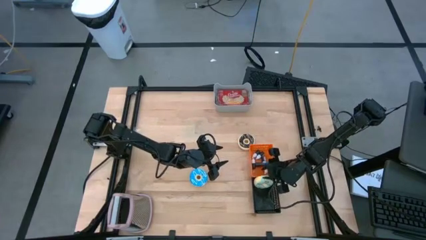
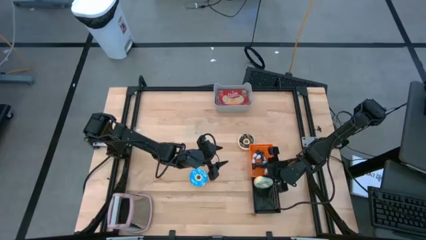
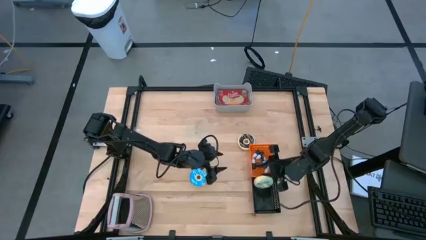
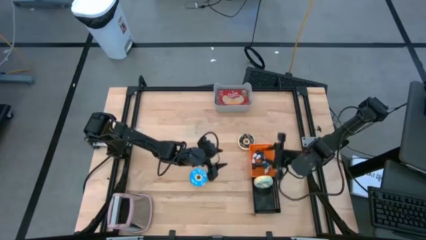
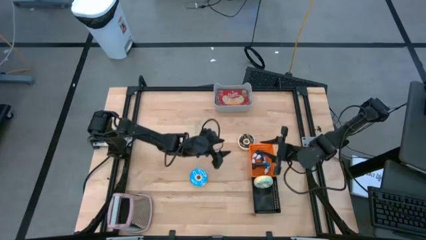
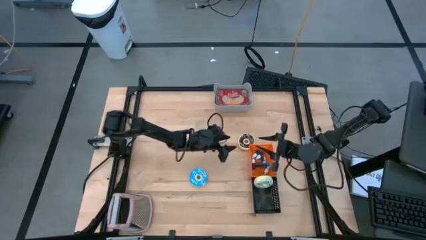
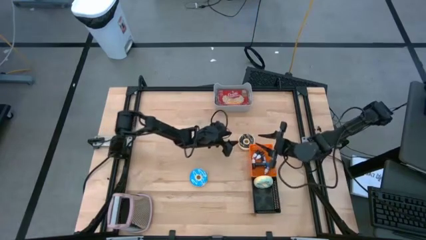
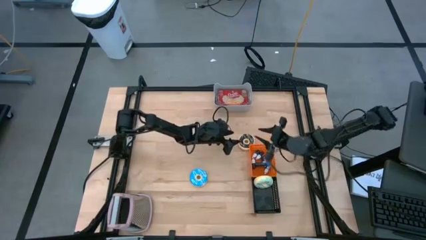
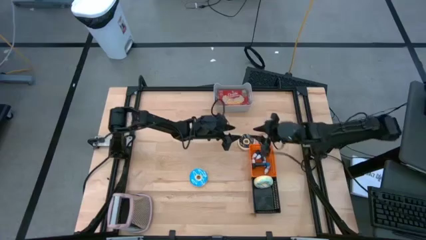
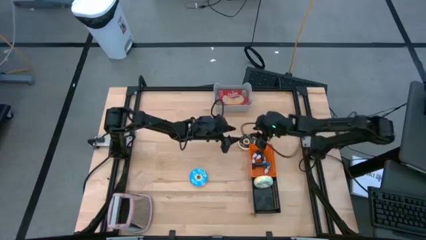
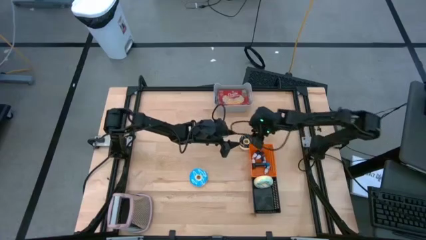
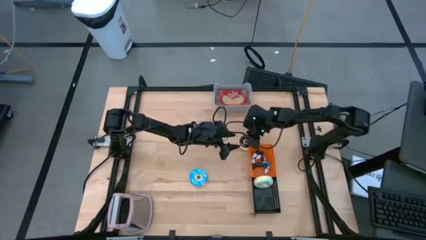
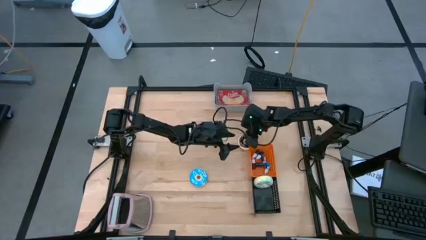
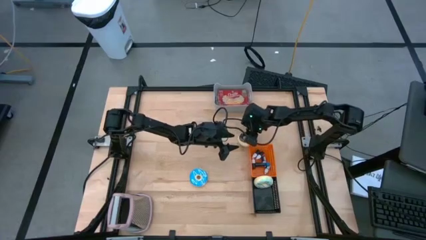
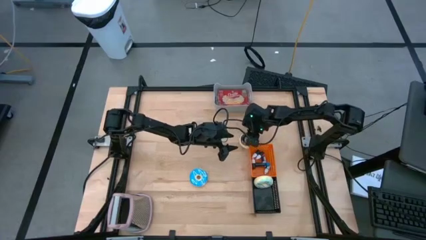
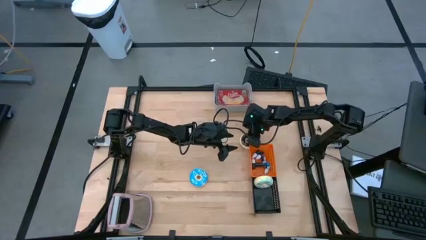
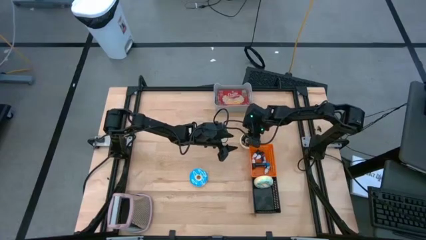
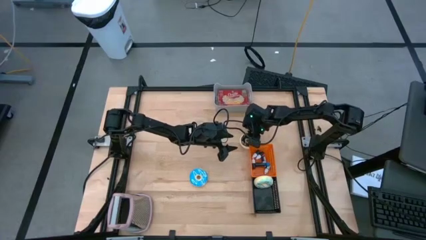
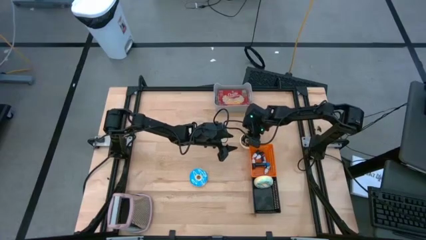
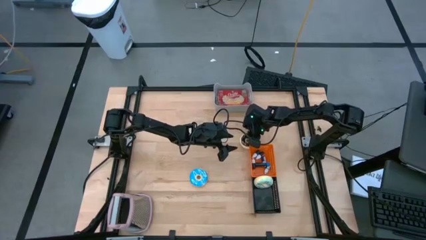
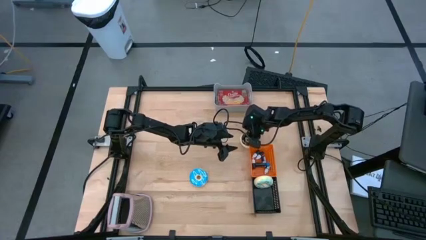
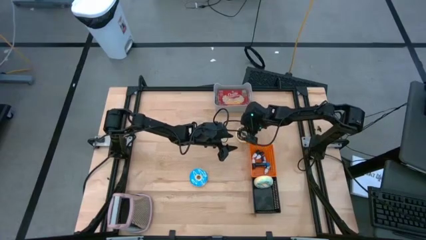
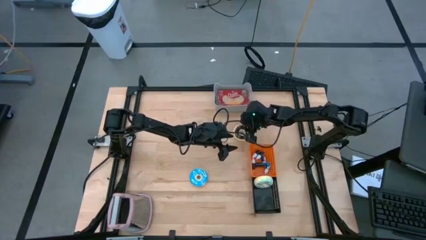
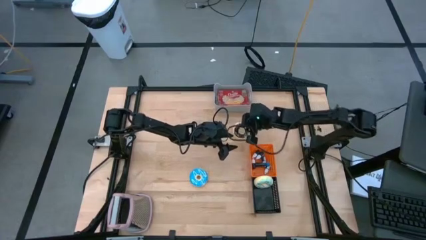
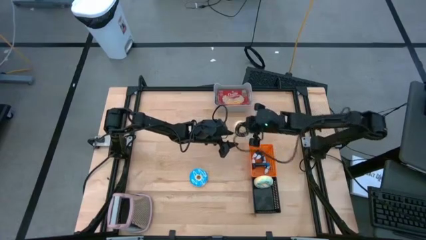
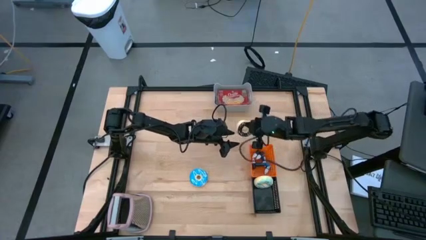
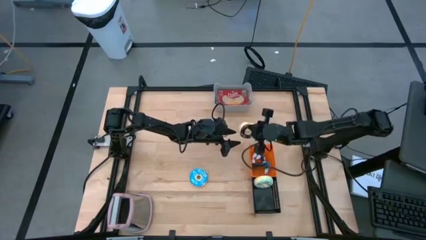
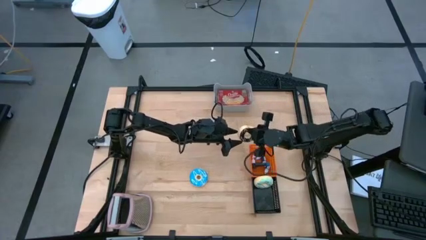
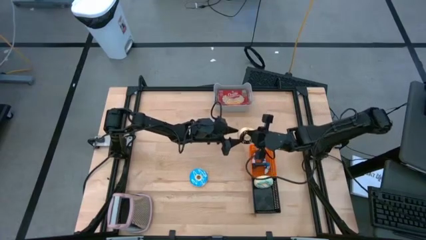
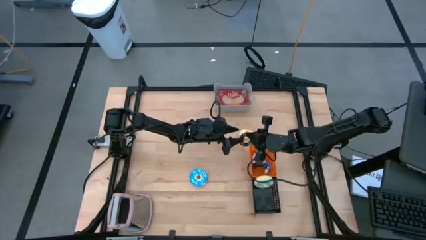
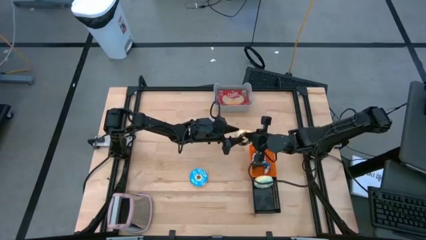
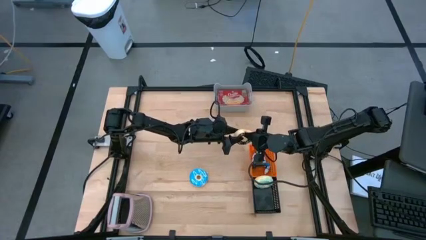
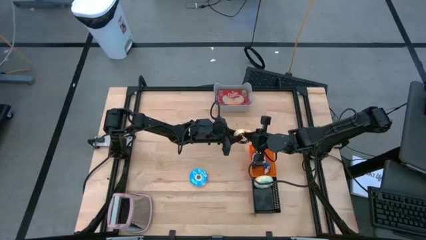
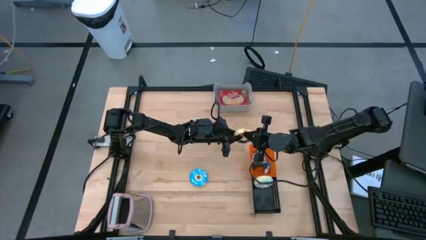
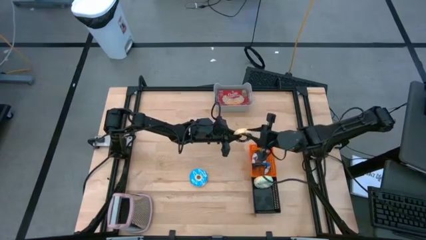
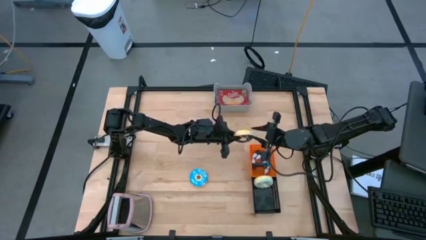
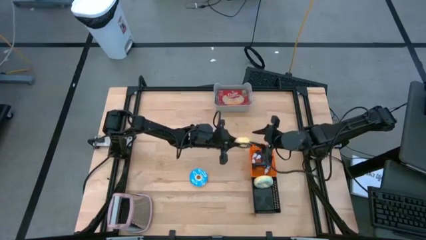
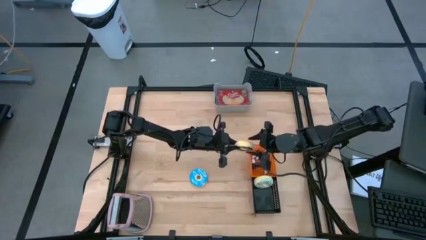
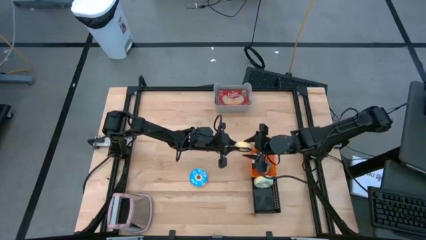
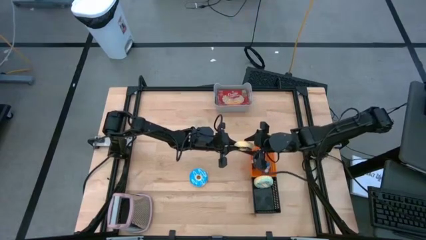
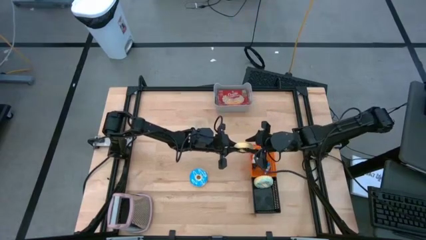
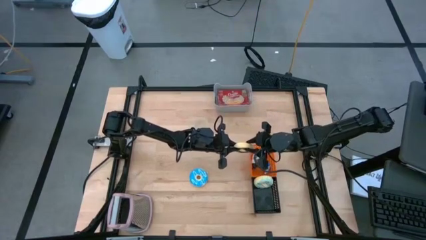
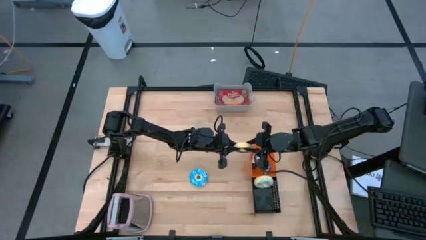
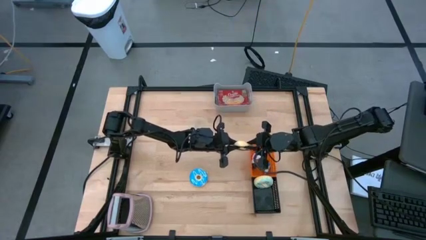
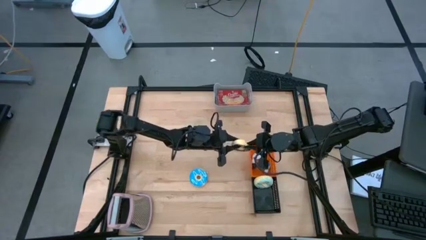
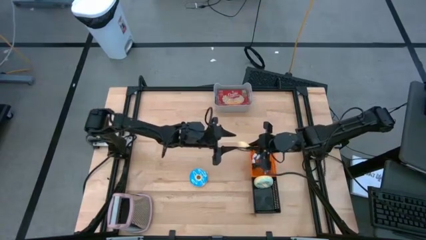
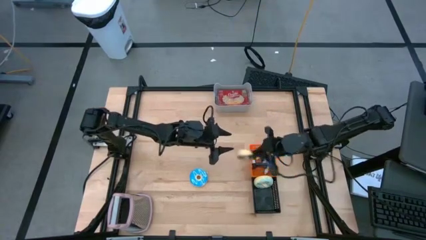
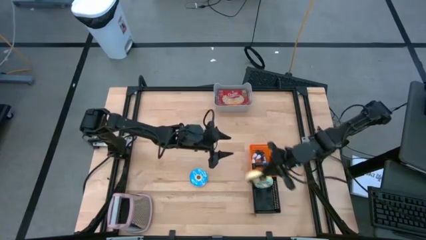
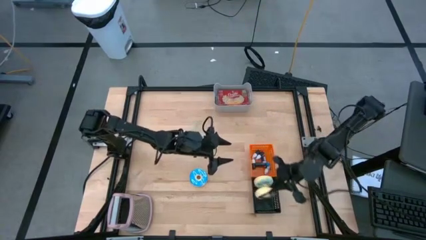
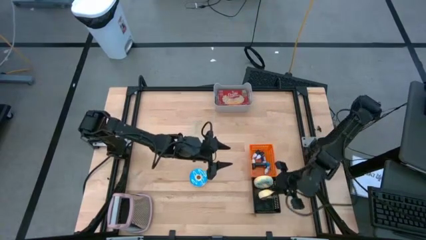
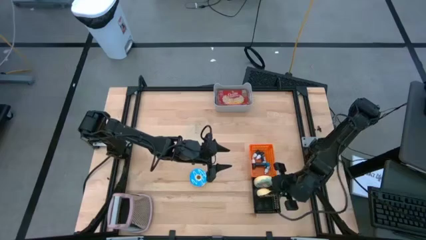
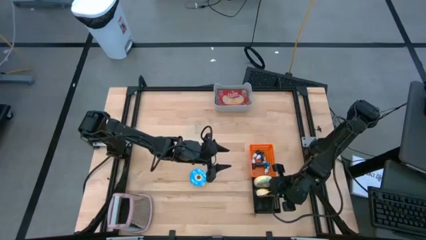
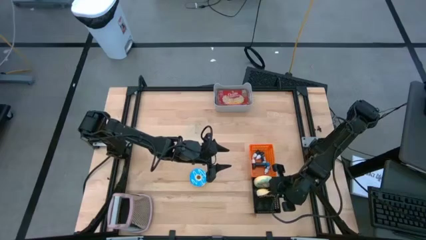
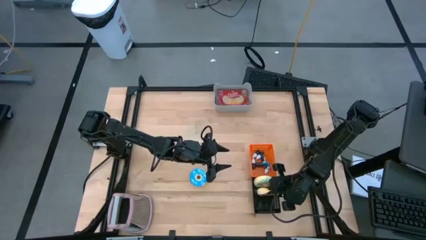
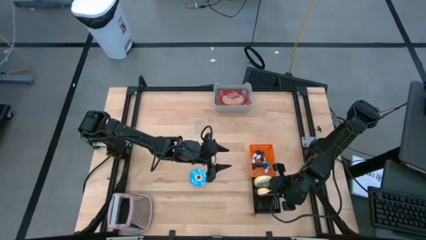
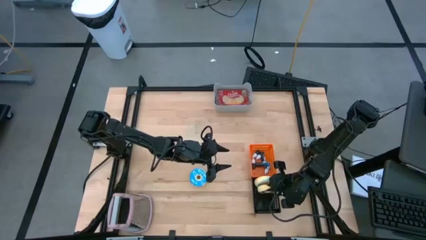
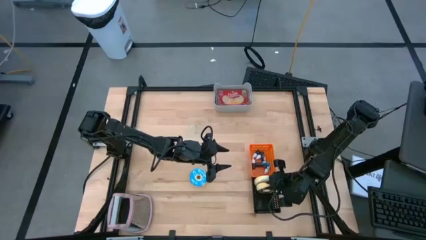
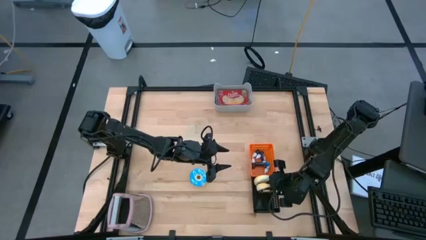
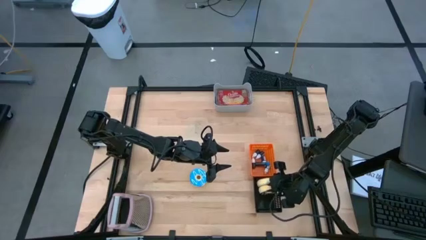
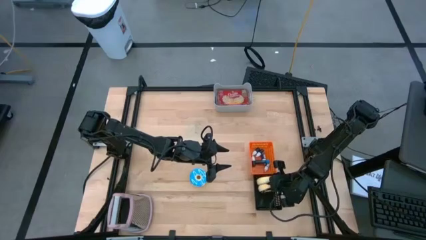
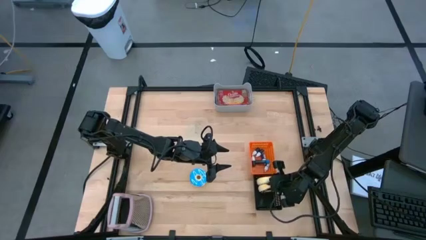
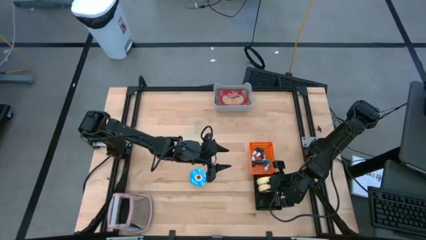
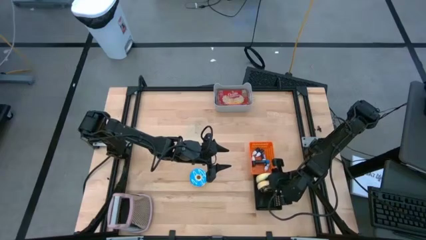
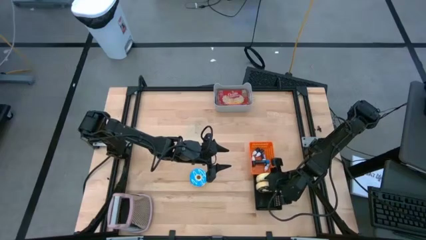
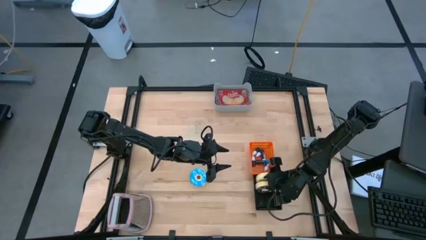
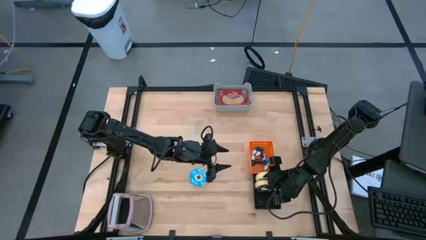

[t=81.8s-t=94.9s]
Put the black donut into the black bin
